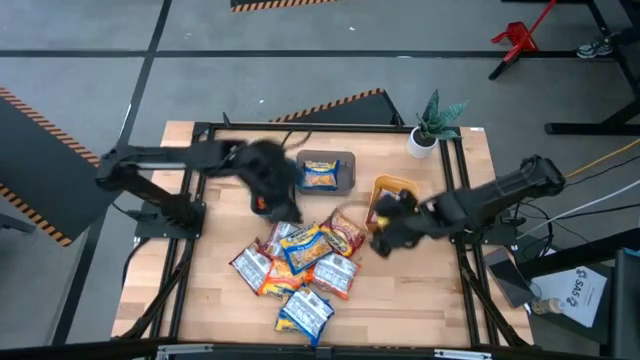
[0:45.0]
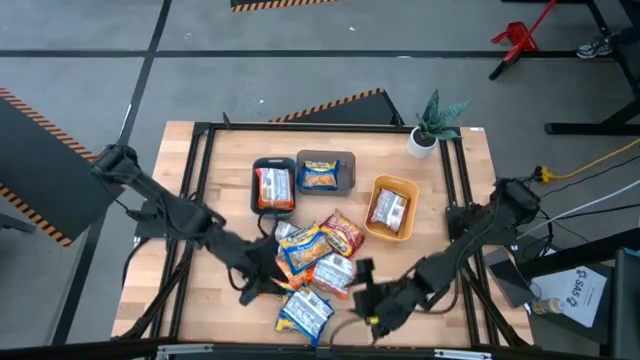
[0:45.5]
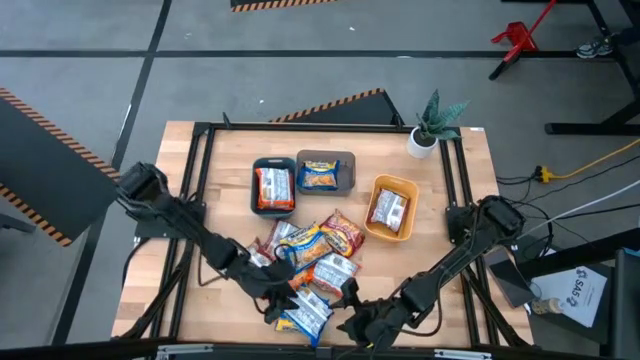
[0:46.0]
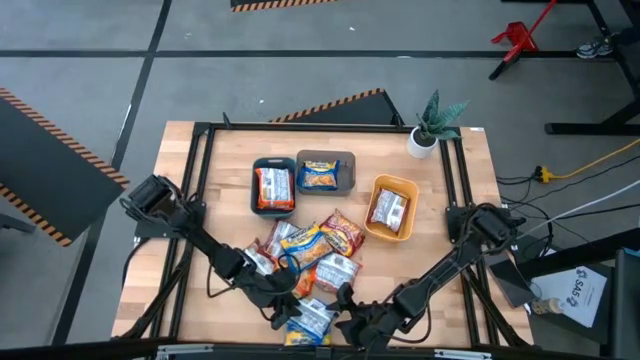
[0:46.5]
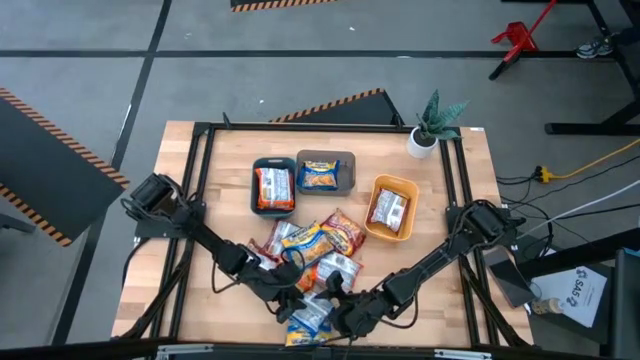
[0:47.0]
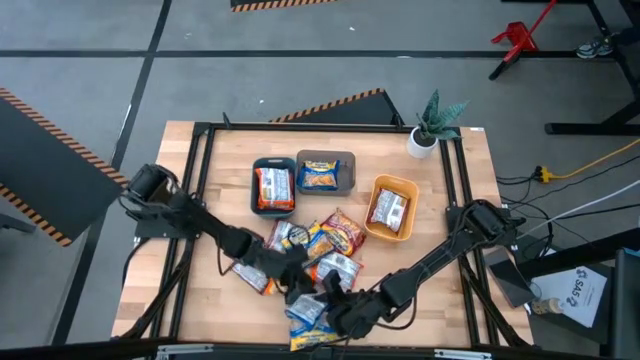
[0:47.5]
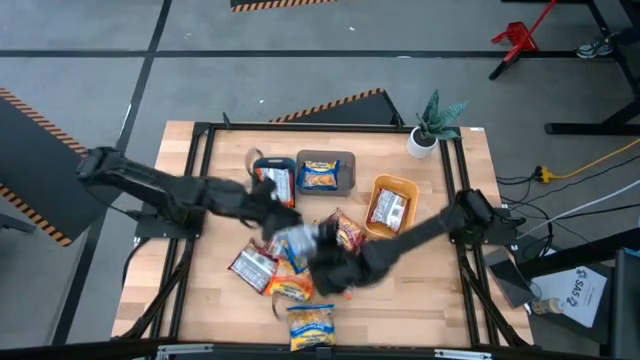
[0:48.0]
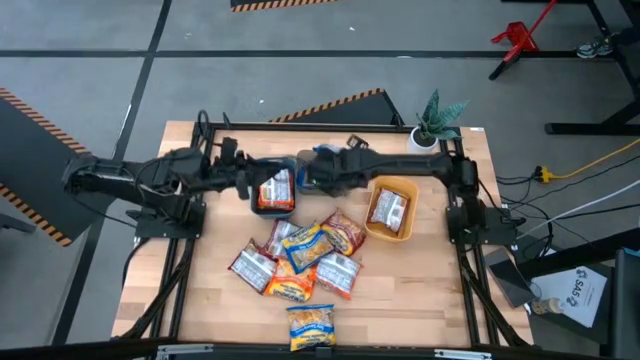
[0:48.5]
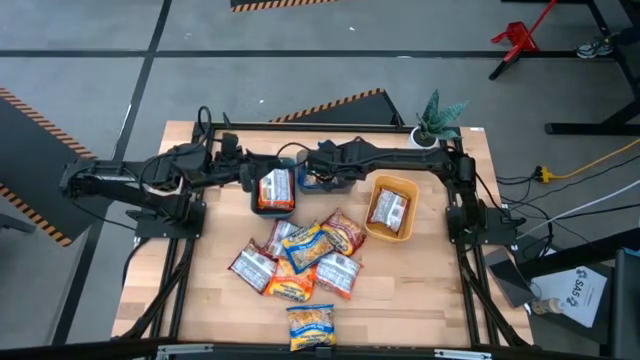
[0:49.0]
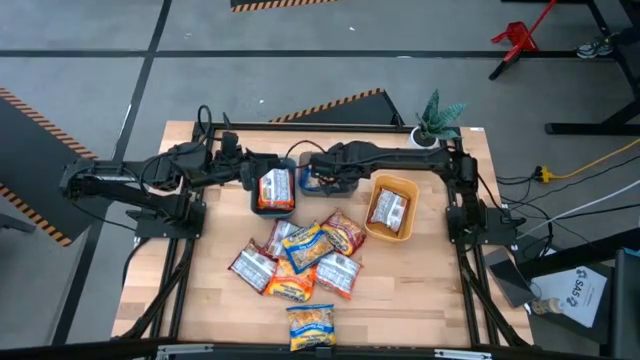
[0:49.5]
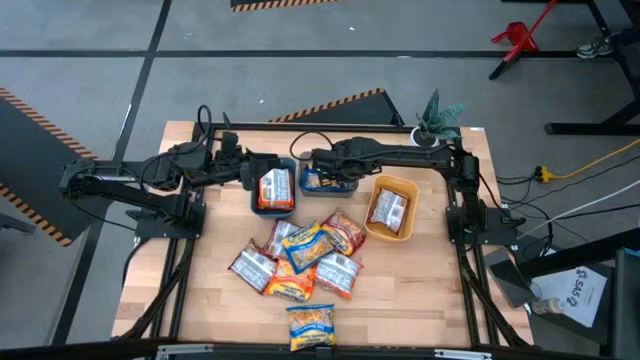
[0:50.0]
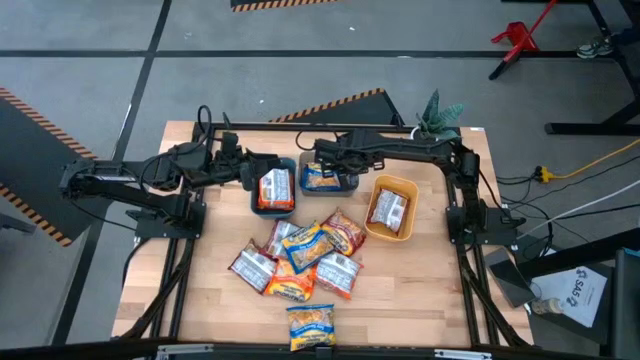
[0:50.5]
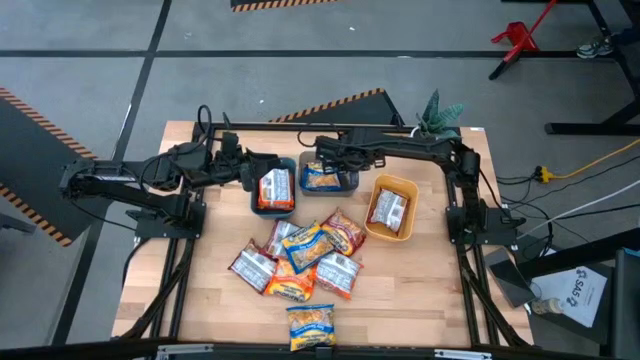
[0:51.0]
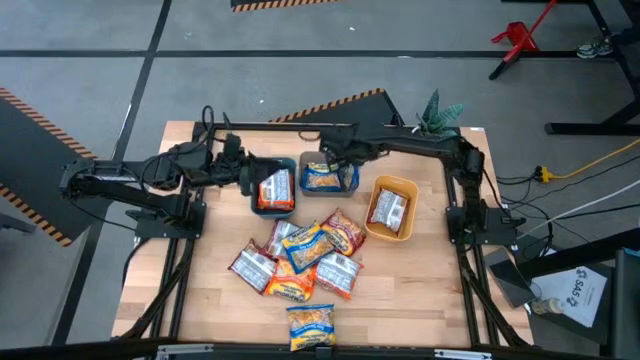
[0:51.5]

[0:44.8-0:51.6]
Task: Sort Maruchan noodles
Put the blue noodle pack into the black transparent bin

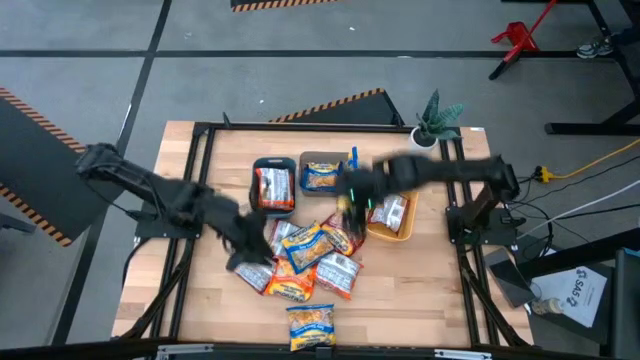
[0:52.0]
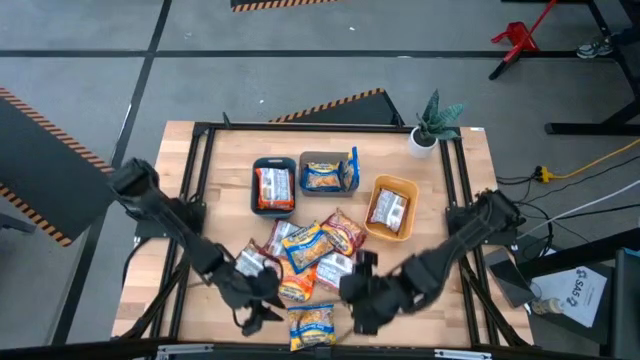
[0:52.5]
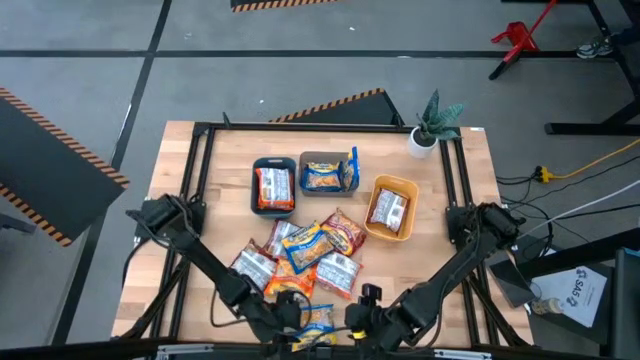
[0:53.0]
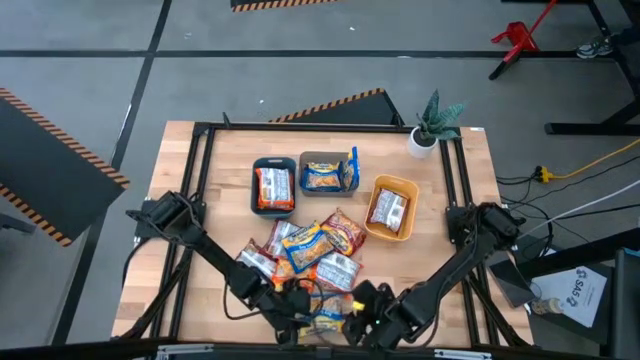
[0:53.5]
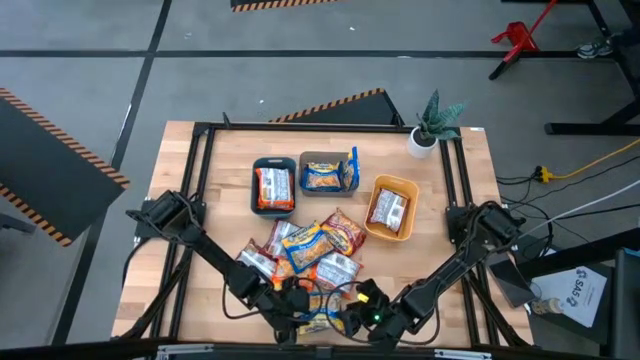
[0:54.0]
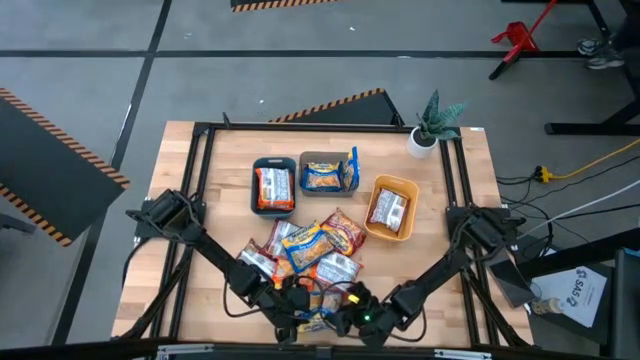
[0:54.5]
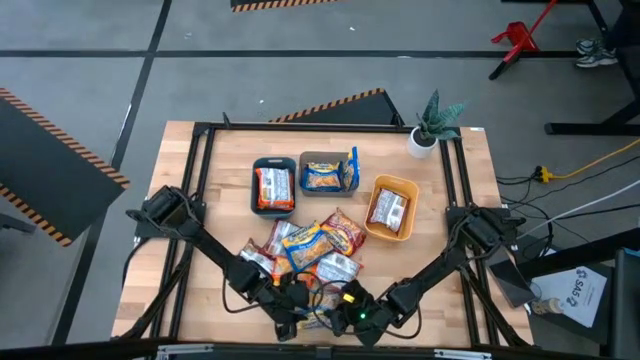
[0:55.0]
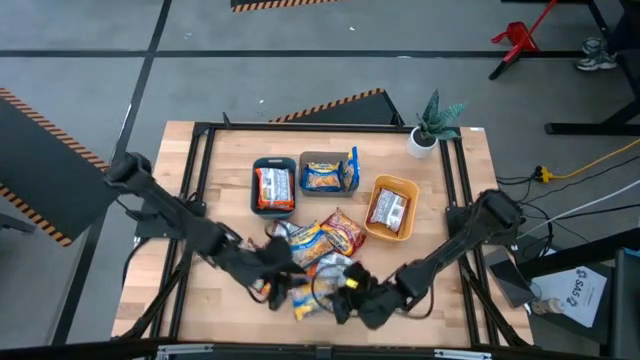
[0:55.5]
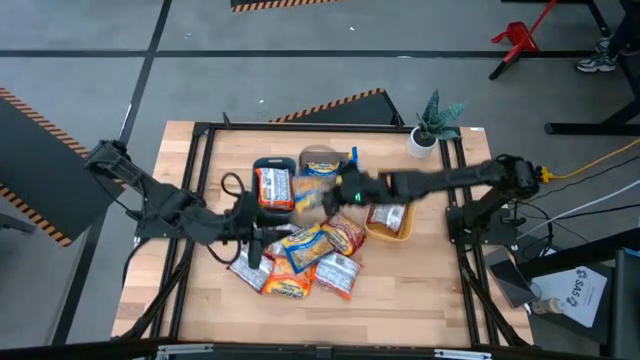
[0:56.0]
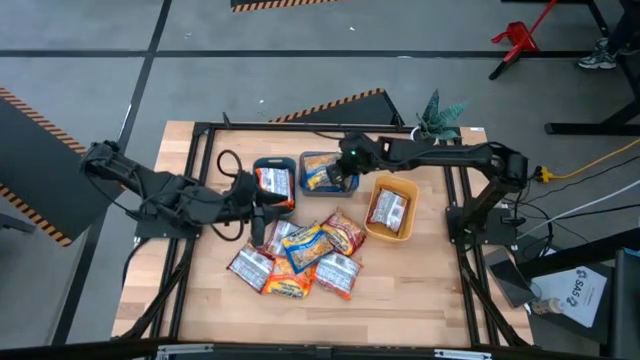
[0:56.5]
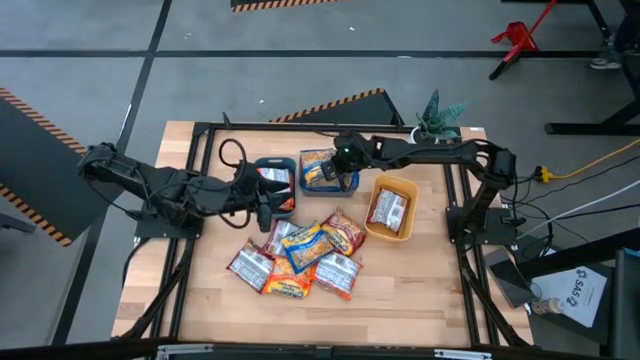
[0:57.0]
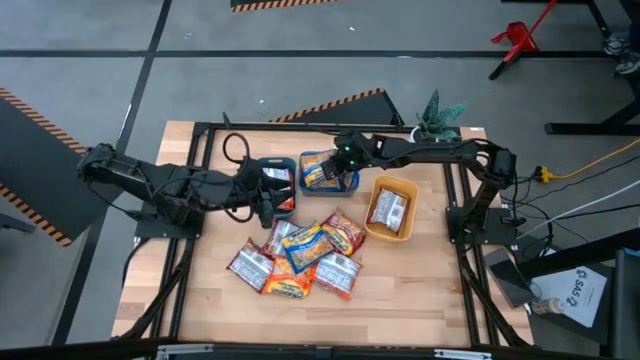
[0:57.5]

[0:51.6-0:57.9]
Put the blue noodle pack into the black transparent bin

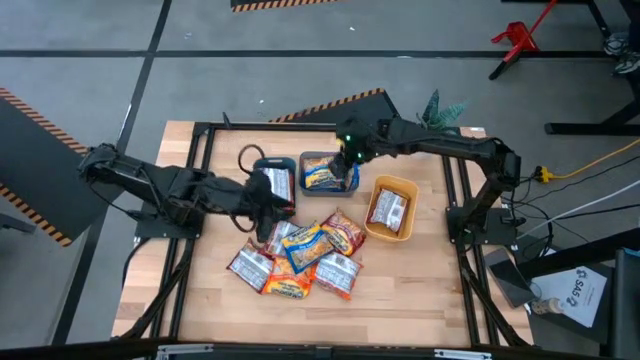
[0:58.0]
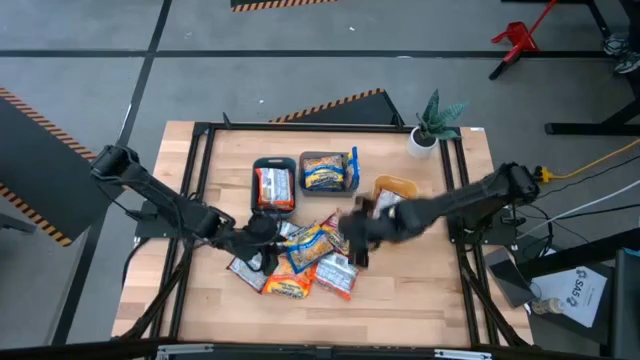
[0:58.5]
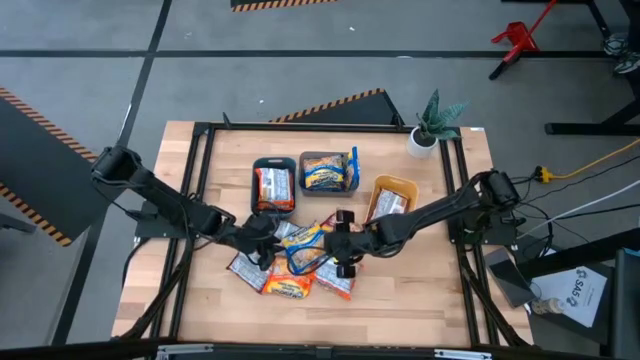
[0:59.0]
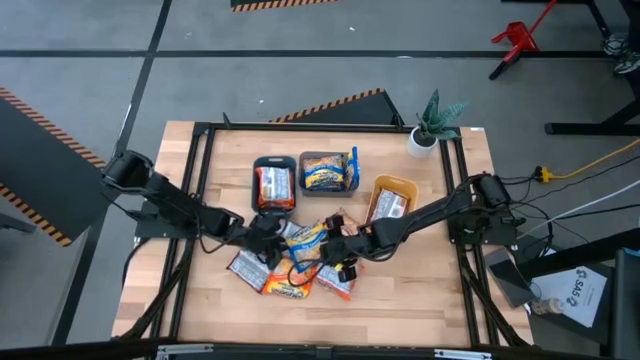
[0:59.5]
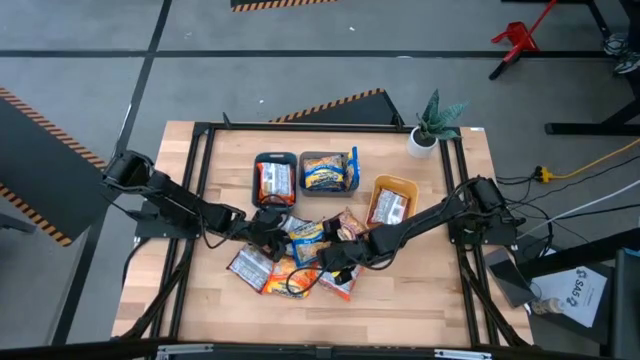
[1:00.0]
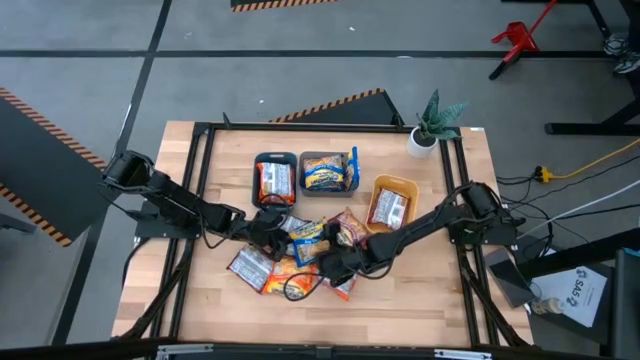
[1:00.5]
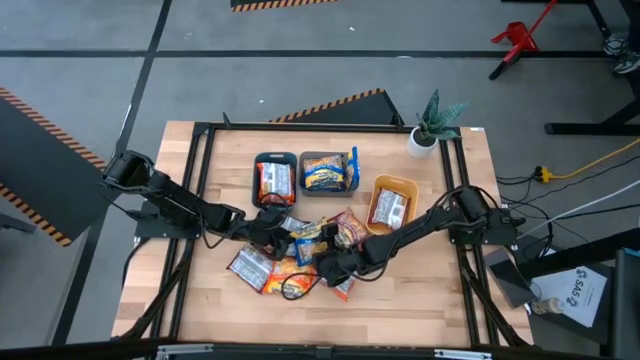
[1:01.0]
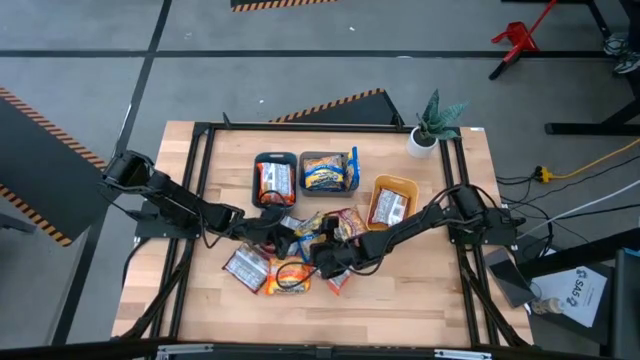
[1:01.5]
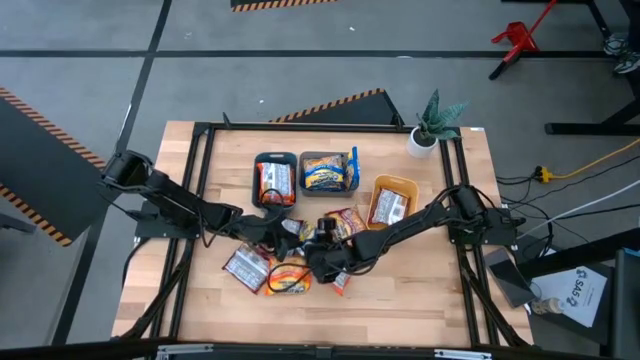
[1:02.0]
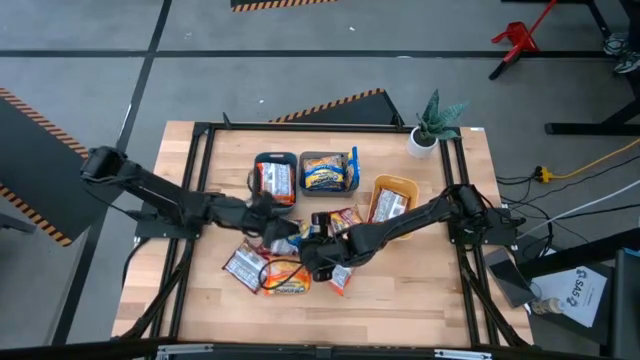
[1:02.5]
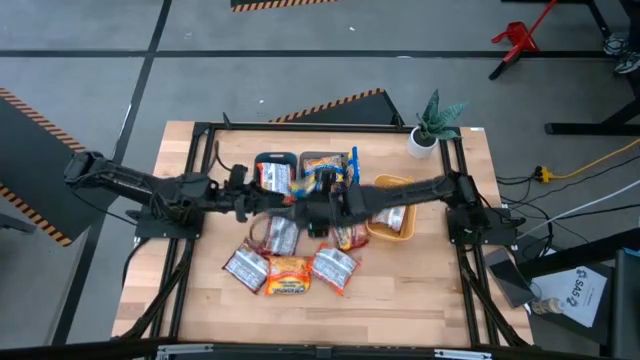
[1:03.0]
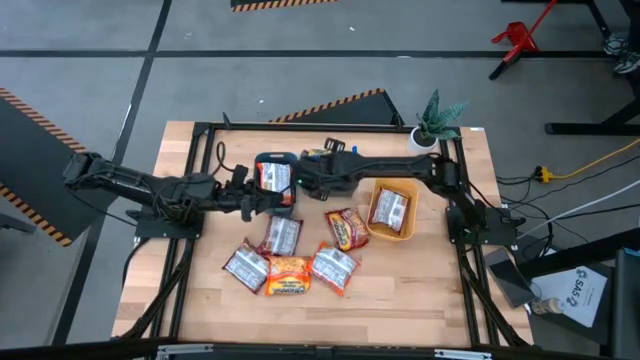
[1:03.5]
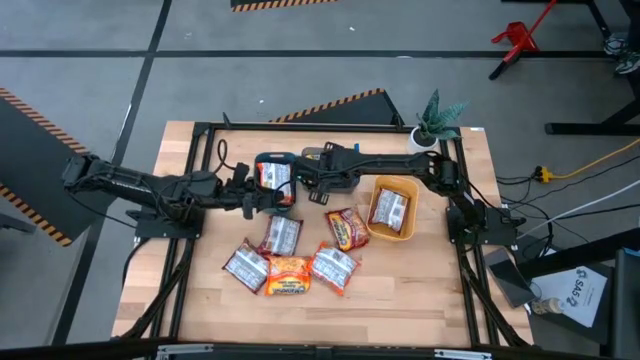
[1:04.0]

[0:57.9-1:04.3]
Put the blue noodle pack into the black transparent bin
